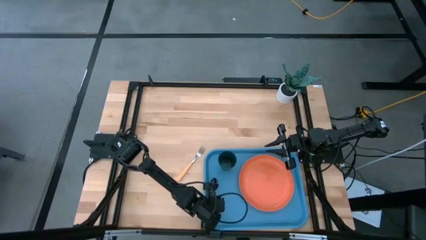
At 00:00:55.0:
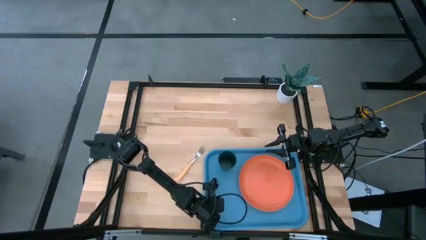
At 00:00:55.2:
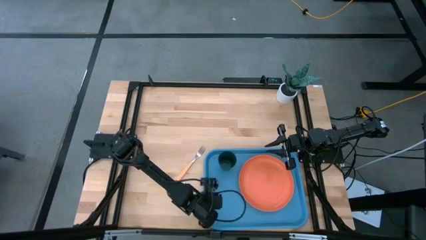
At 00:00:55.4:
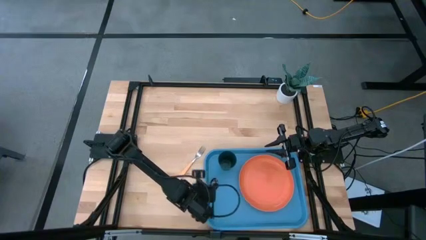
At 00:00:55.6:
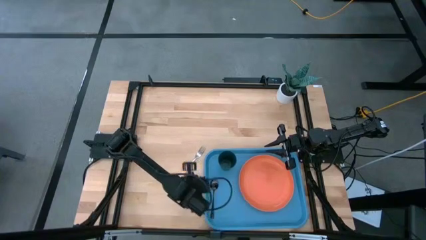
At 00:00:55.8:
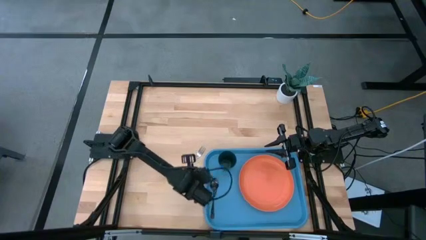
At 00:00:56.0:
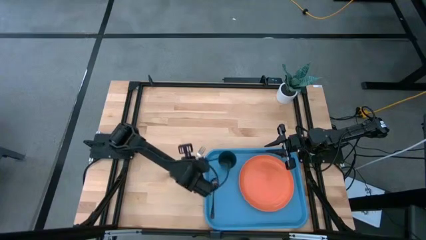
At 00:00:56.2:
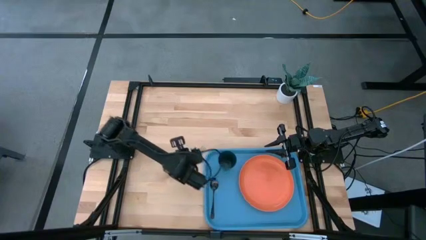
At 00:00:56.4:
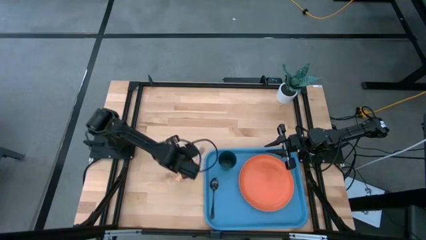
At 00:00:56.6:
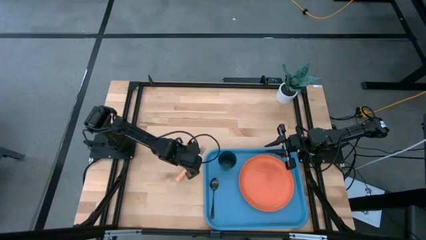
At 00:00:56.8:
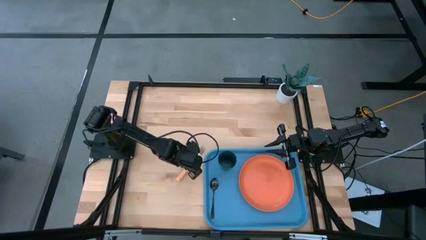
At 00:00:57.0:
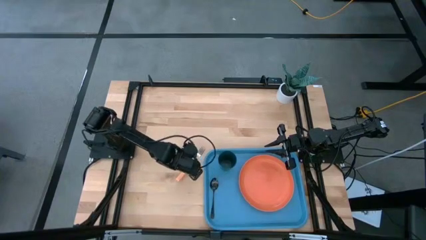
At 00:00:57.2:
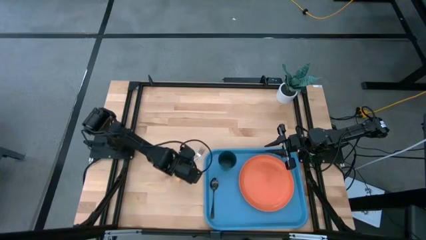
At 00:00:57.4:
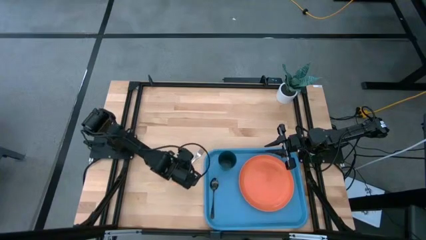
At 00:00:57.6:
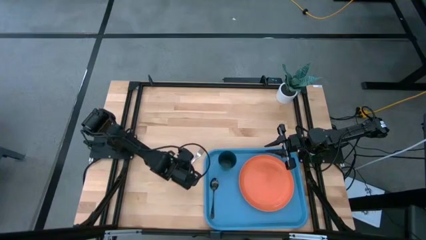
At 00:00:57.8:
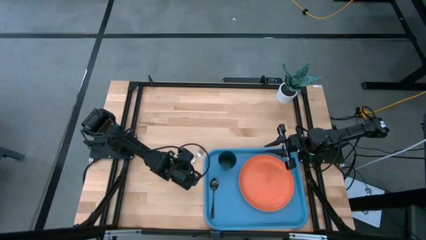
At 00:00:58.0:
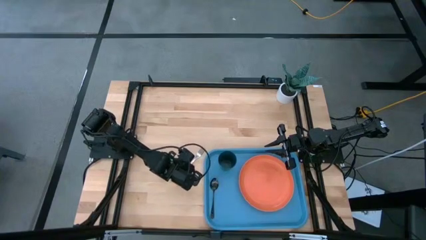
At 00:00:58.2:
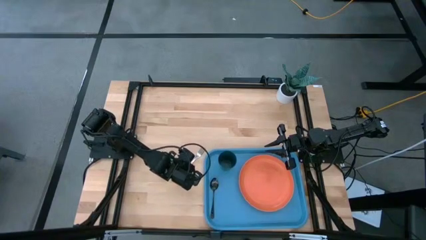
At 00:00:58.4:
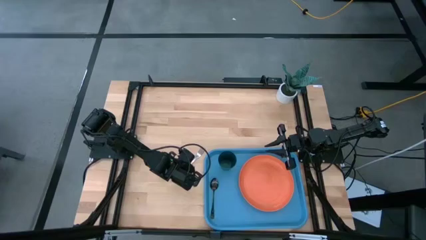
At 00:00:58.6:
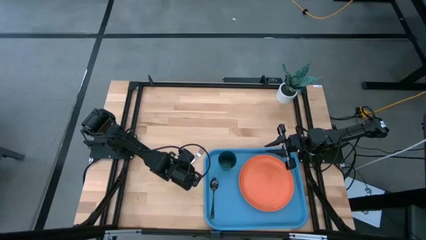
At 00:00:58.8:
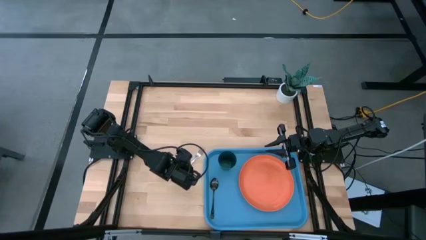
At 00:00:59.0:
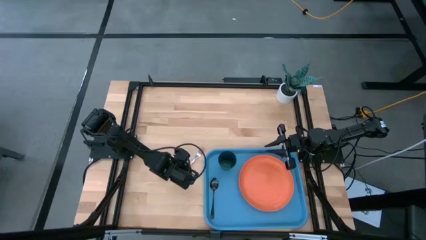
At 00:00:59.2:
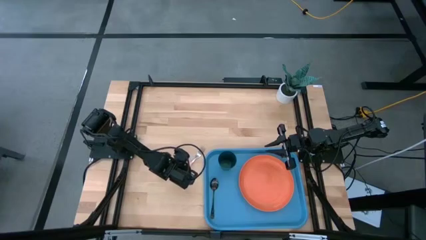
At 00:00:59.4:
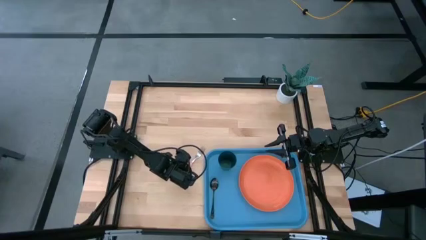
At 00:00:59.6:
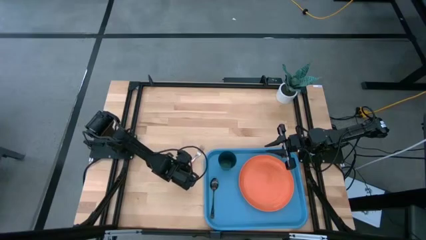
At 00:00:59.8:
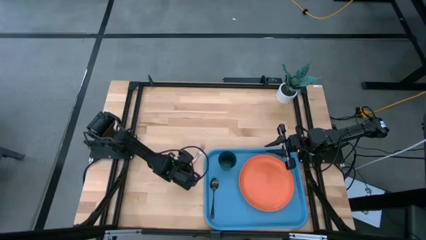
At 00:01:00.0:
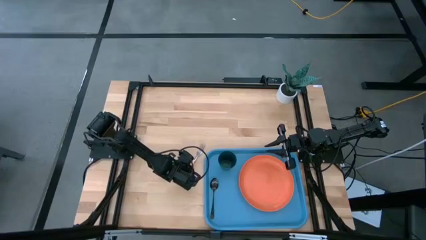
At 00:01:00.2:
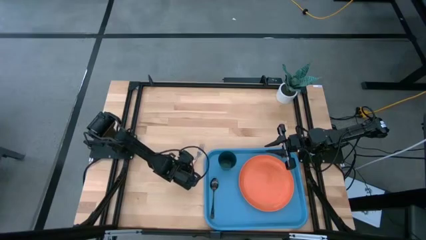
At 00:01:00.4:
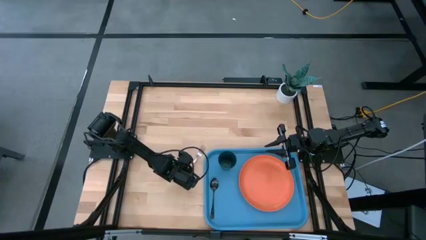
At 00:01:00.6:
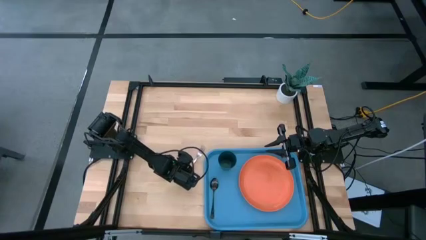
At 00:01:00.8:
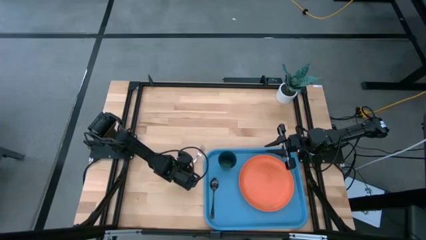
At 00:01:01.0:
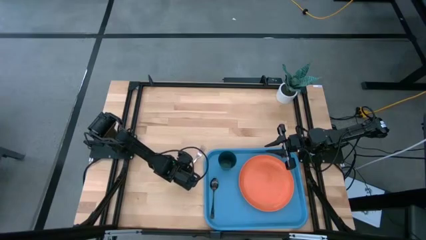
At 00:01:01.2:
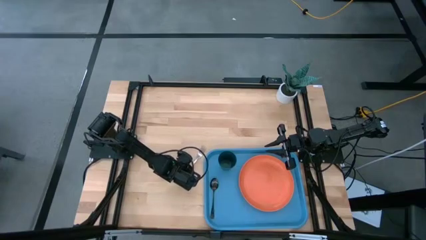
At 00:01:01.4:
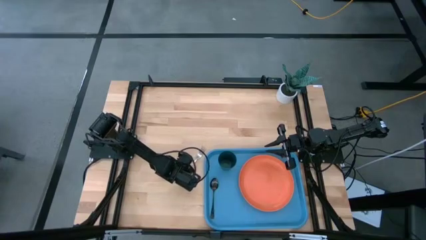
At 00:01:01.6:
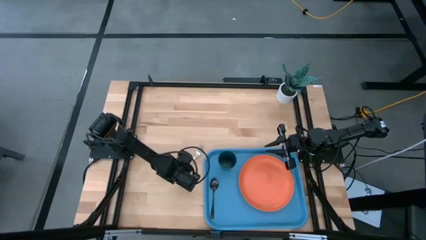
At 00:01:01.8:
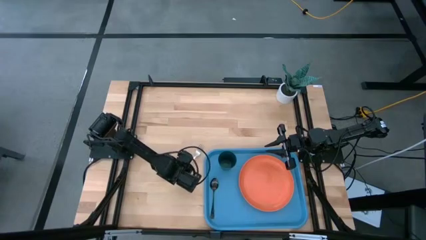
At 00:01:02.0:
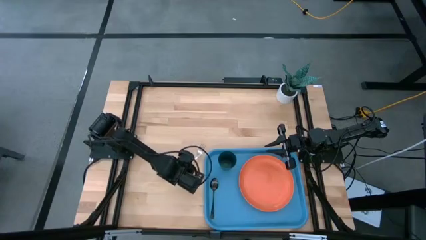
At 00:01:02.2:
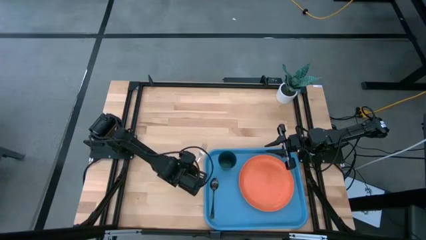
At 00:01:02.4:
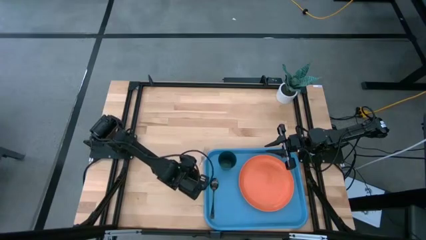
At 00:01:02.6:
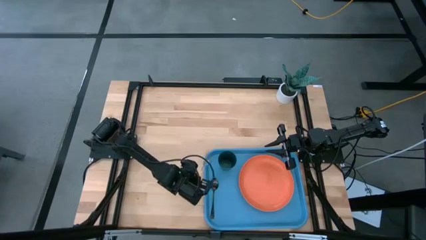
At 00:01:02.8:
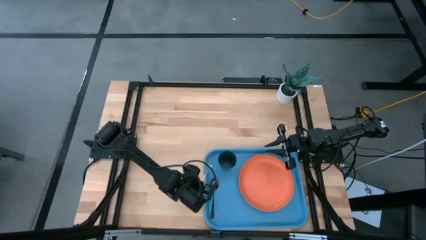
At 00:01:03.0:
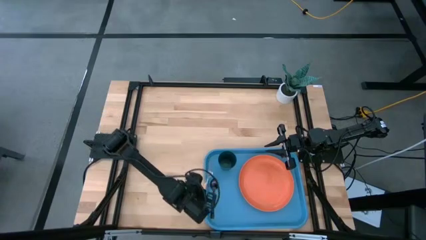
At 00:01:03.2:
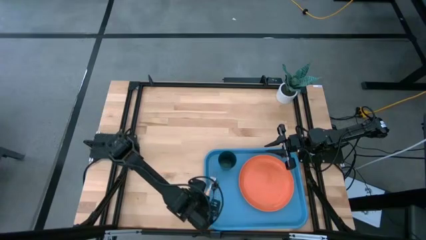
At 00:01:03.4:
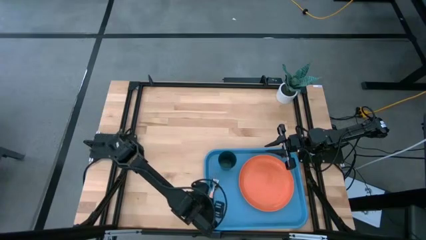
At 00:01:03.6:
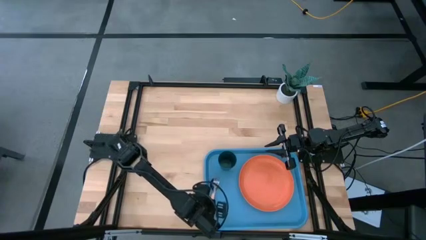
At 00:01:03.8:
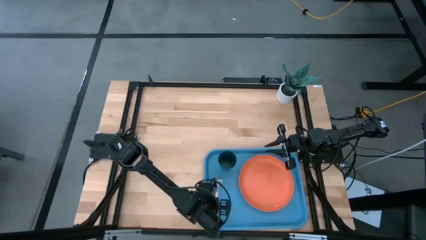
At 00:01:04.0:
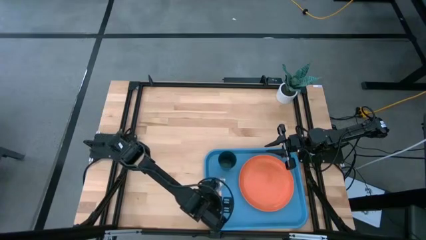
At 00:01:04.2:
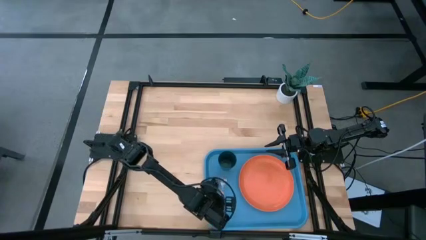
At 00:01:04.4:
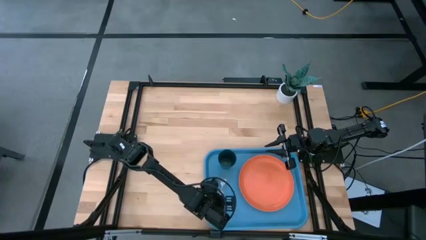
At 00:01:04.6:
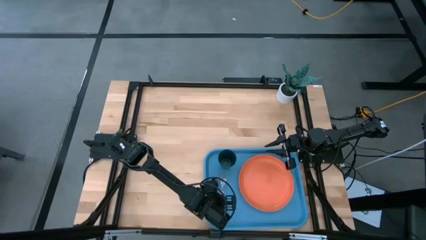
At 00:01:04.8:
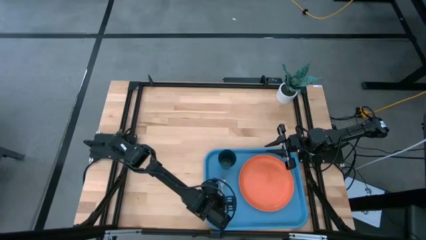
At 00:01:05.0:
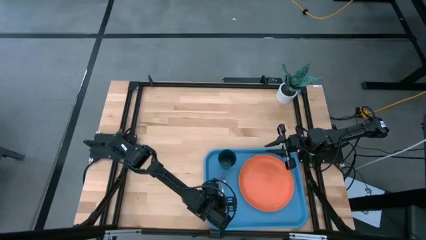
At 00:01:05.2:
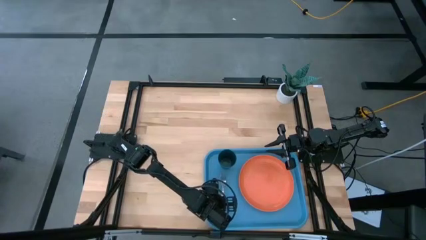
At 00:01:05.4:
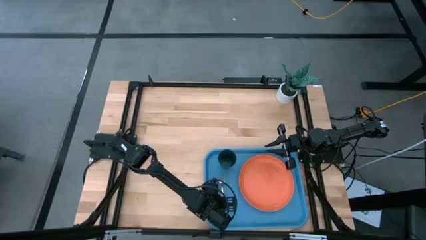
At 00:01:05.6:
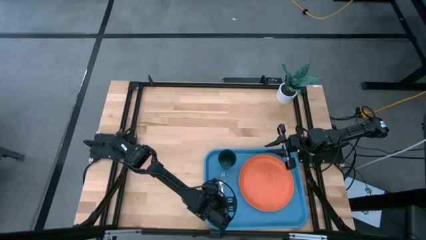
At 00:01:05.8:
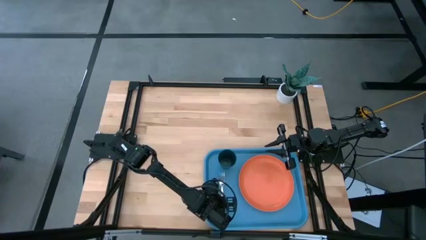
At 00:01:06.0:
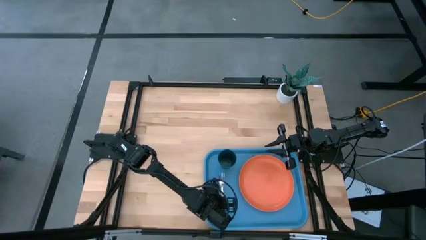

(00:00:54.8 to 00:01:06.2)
Task: Pick and place plate/cup/fork/spoon on tray
Put the orange fork on the blue serving tray to the right side of the orange plate

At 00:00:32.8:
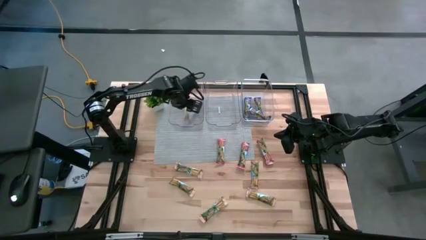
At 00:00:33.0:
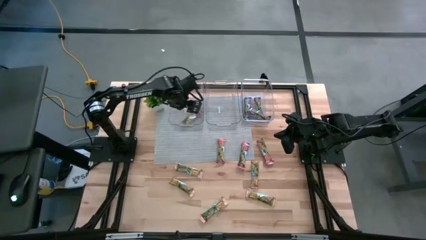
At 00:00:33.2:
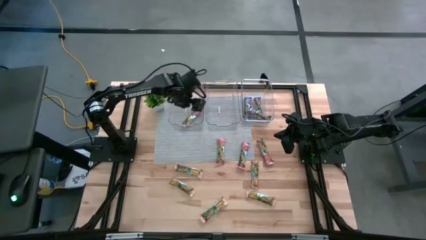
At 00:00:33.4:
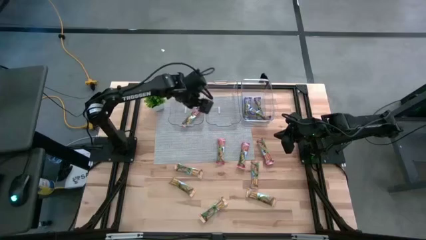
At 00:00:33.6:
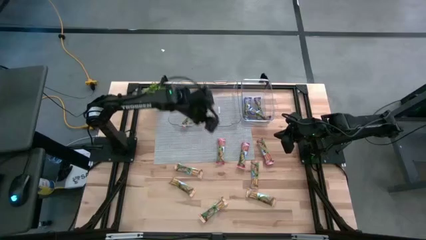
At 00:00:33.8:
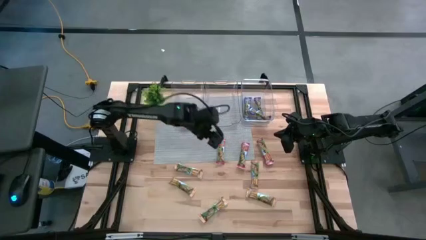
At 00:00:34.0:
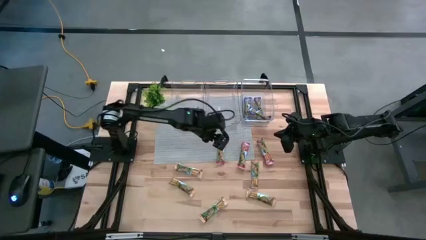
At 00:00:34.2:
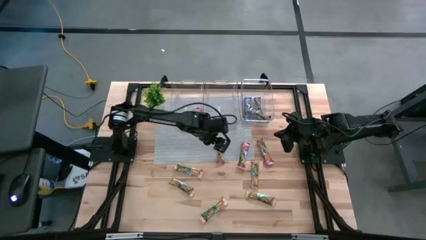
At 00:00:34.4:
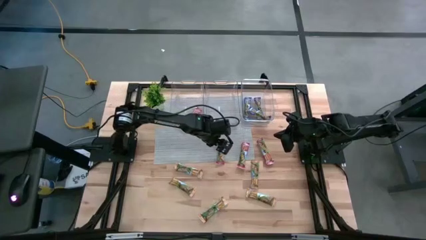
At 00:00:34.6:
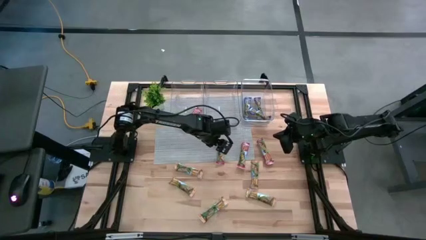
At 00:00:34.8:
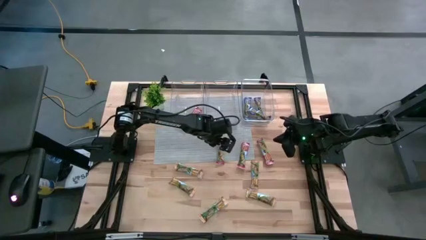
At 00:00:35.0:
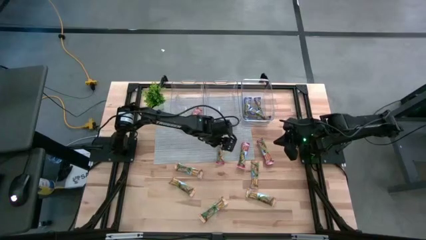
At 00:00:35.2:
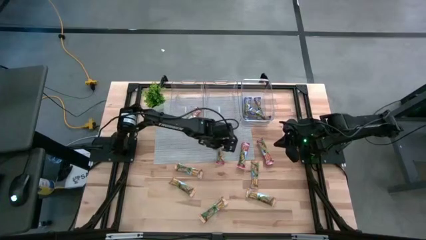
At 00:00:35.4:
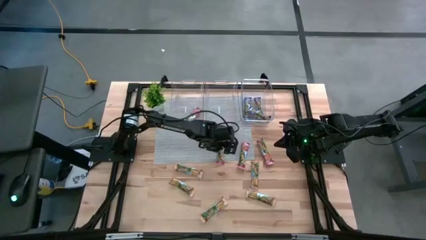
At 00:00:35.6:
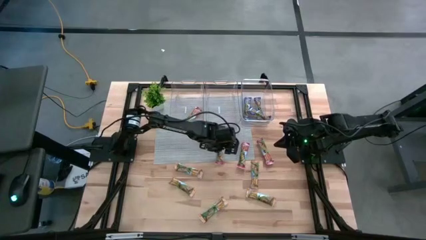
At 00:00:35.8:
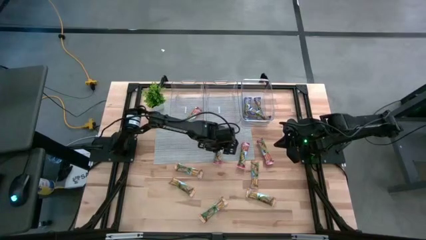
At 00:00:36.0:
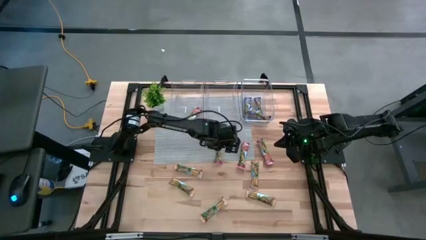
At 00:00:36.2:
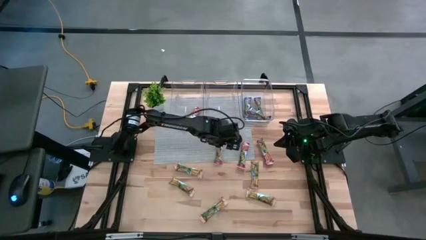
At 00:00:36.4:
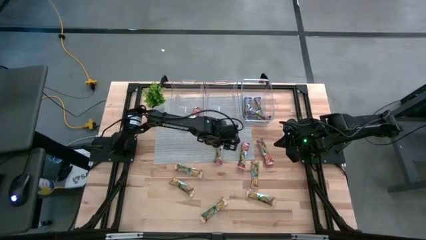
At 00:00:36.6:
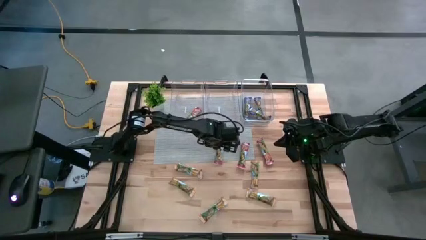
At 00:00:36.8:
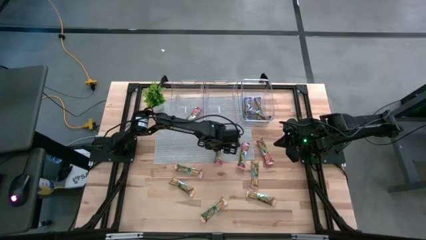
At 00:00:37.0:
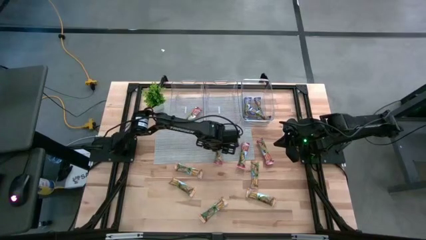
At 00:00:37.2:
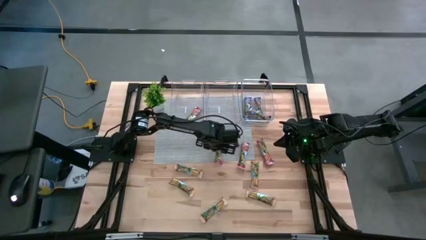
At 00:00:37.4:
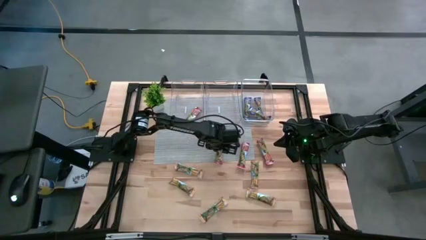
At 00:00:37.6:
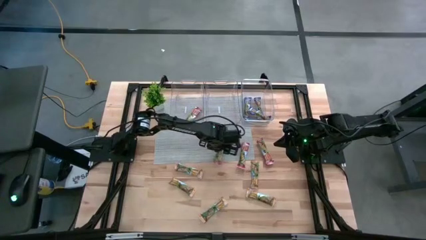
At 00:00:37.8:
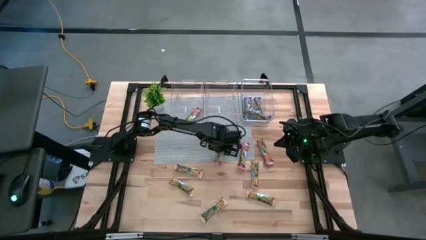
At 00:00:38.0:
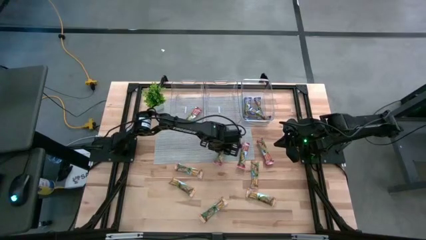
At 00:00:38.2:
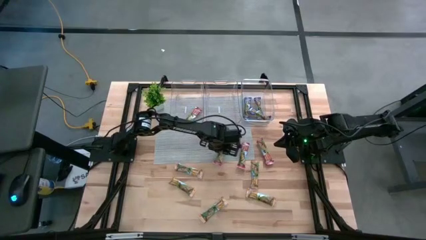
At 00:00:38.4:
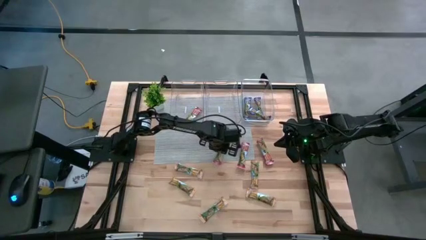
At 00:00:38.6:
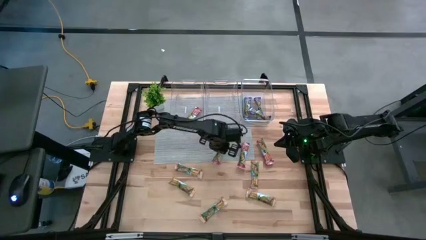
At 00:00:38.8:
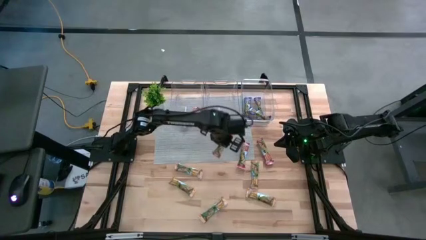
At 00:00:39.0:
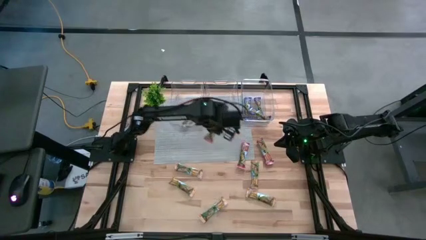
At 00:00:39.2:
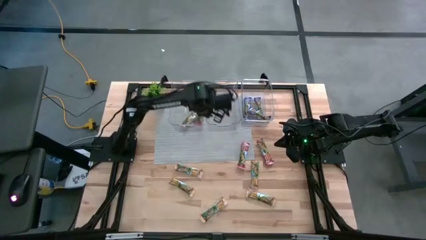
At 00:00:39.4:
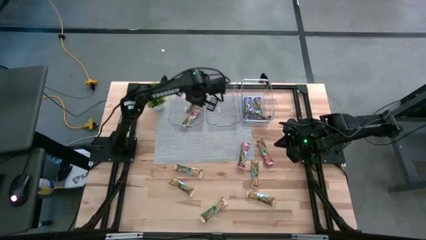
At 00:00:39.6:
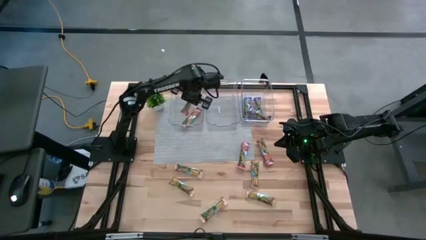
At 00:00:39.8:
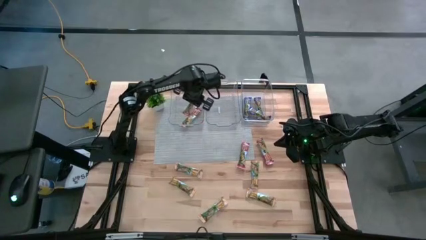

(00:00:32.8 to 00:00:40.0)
Task: Pick and place Granola Bars by type
Put the red granola bar into the left transparent bin
